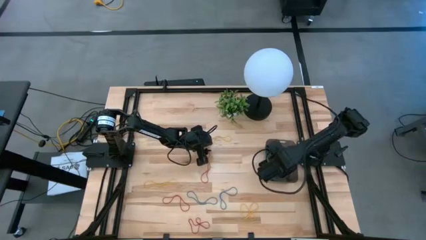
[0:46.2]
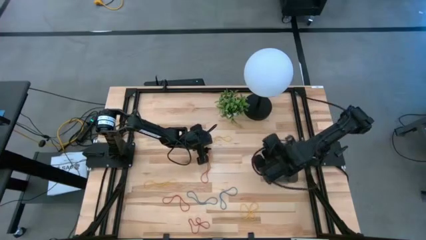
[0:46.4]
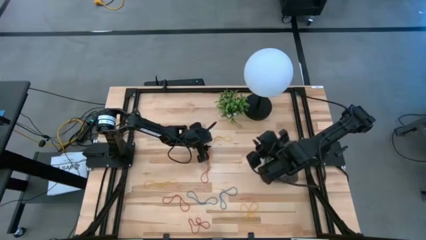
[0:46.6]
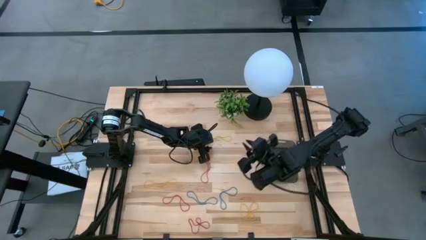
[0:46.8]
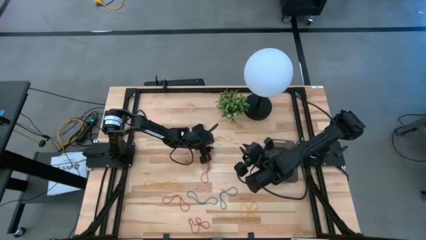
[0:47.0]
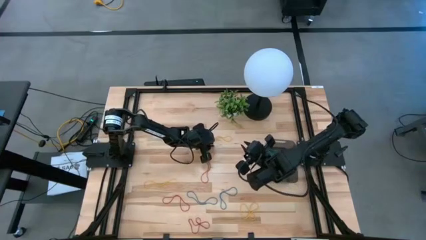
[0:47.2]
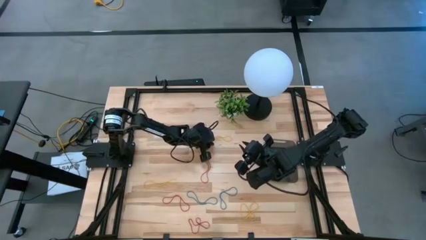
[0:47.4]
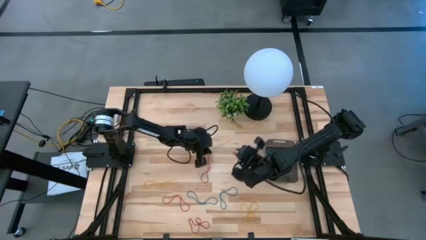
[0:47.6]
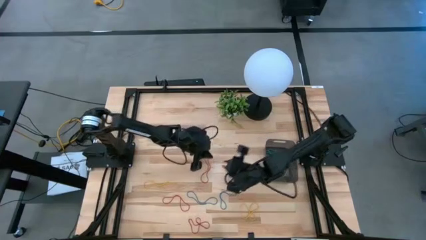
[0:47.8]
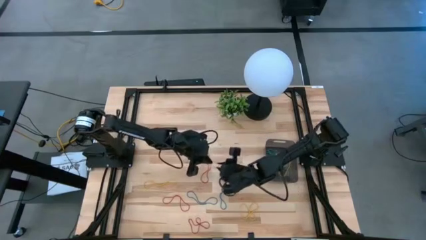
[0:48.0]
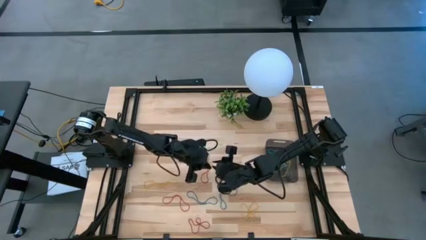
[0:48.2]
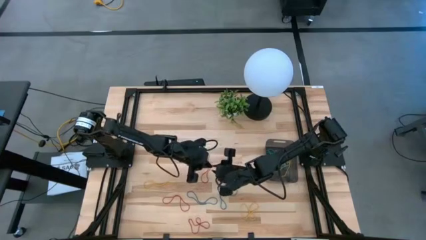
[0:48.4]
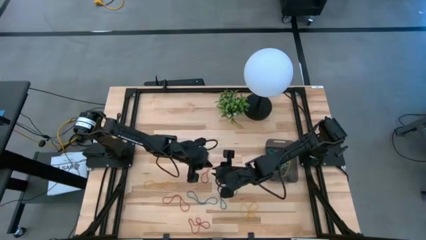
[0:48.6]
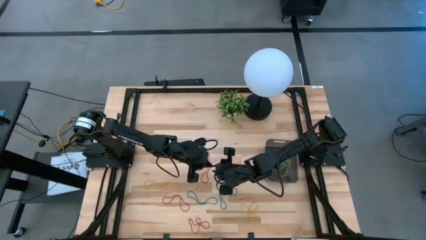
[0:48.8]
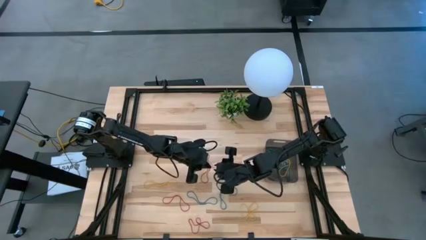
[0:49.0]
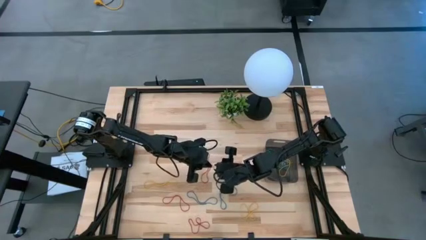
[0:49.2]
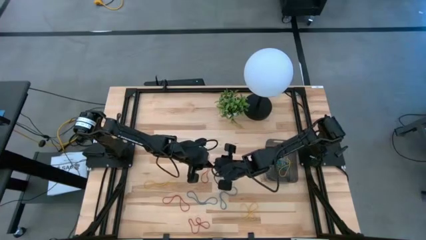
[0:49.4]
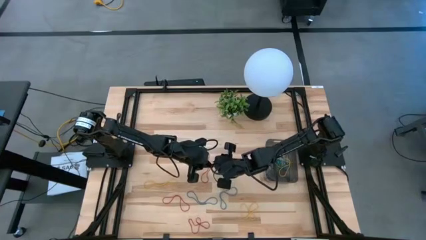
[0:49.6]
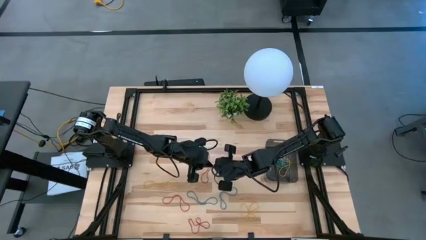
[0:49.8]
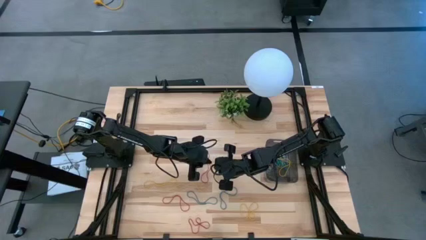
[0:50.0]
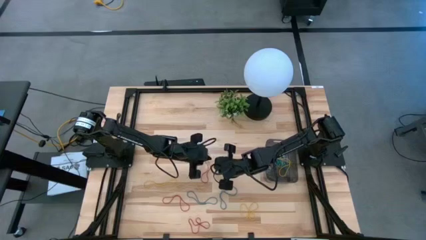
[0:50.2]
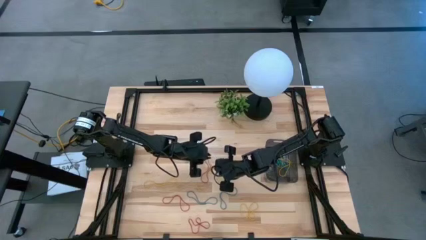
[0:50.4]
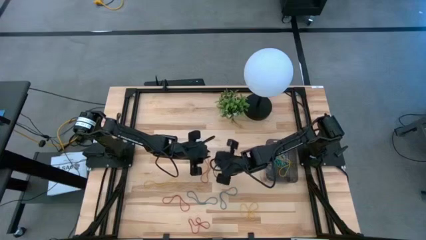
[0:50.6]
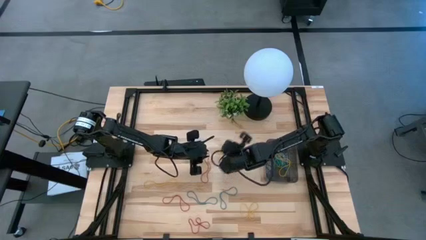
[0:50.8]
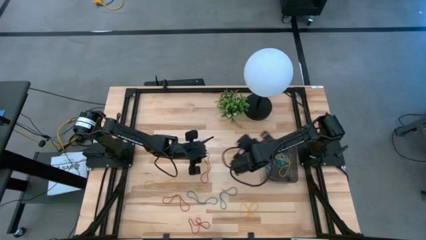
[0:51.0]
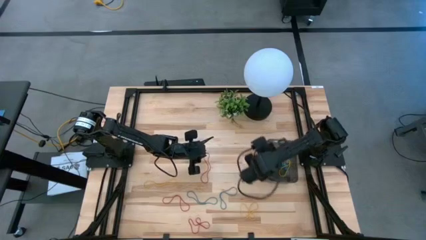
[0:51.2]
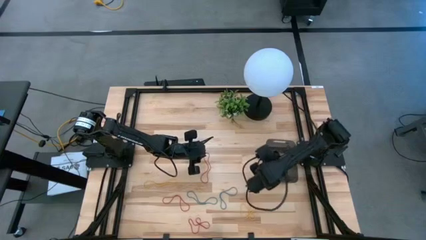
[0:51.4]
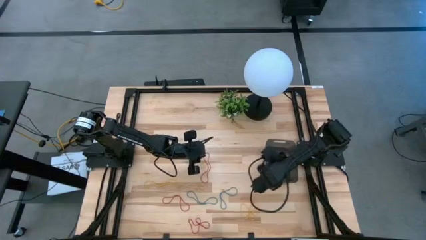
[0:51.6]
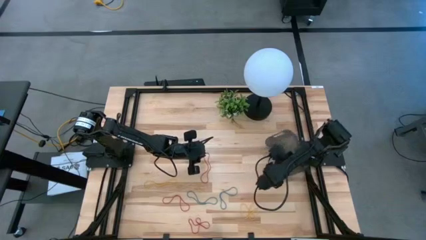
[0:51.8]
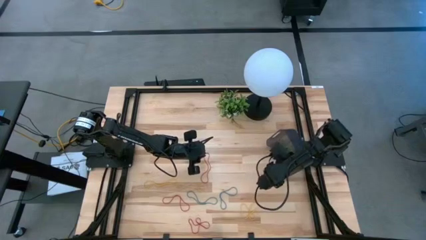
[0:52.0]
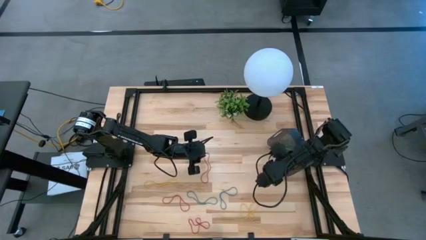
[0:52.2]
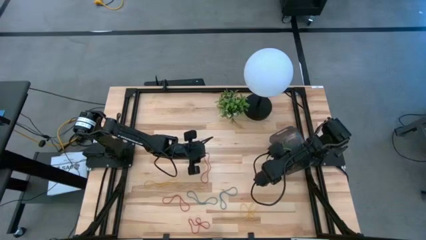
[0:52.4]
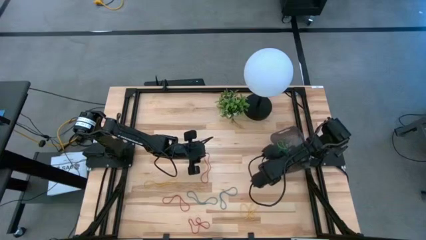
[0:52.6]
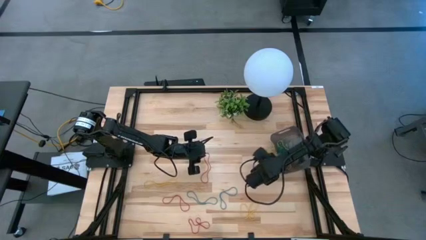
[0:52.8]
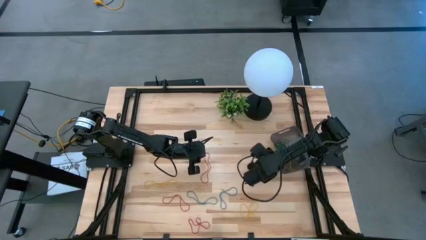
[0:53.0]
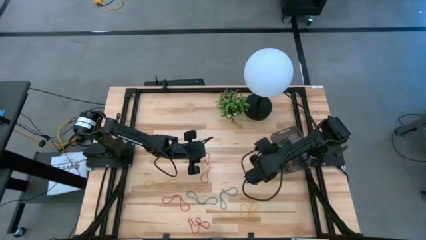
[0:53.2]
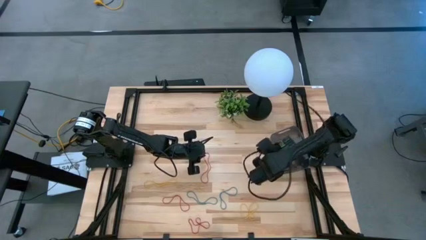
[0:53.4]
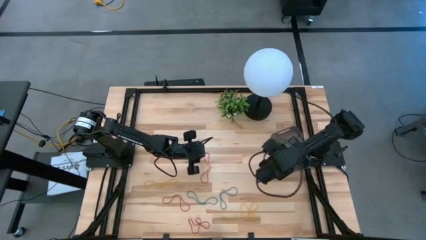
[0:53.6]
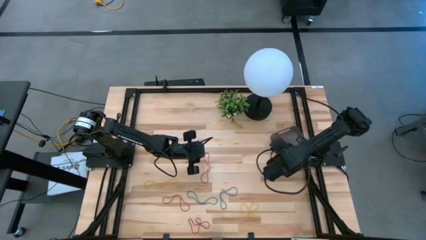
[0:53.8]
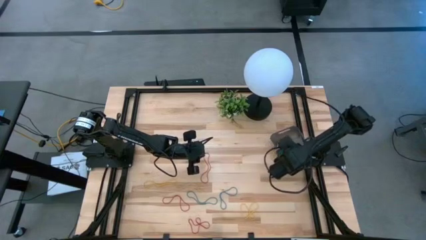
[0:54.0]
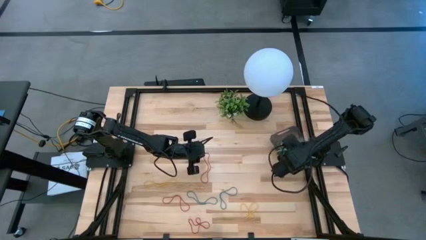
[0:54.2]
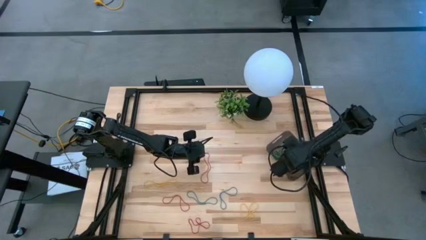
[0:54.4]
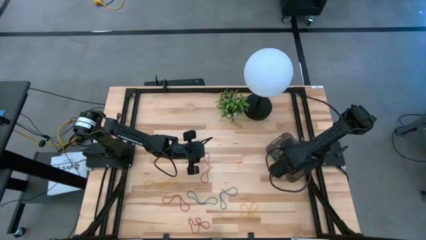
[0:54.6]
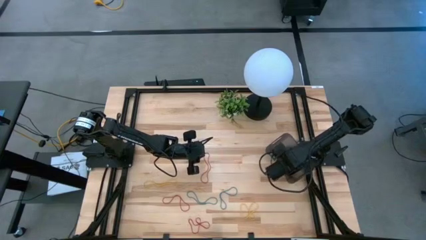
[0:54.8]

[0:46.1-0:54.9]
Task: Pick and place items into bin
Put the top yellow rubber band into the black transparent bin

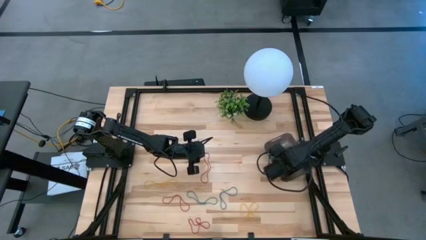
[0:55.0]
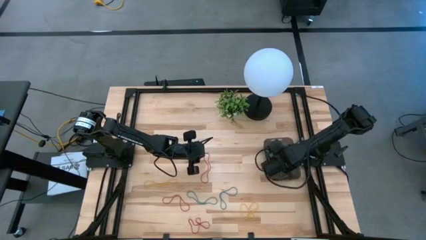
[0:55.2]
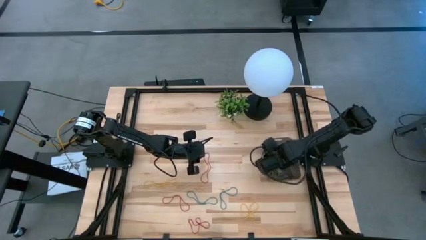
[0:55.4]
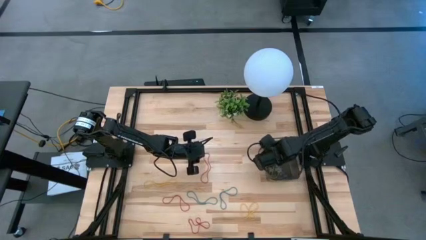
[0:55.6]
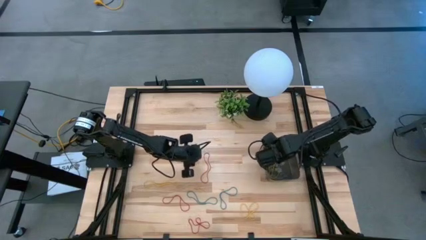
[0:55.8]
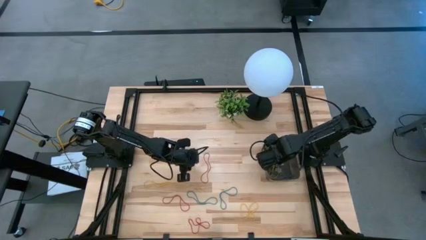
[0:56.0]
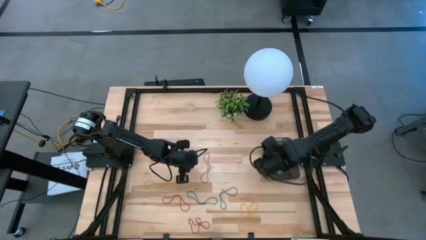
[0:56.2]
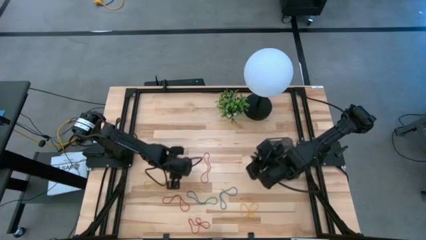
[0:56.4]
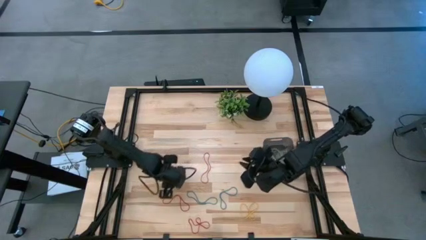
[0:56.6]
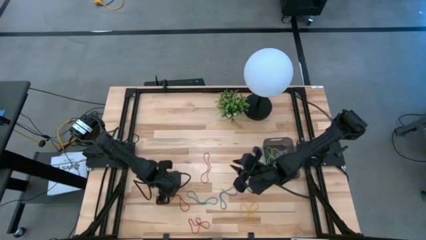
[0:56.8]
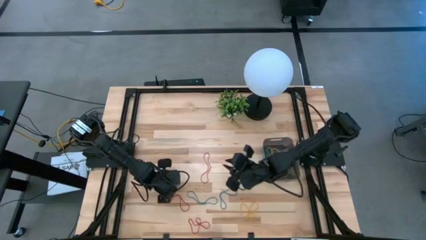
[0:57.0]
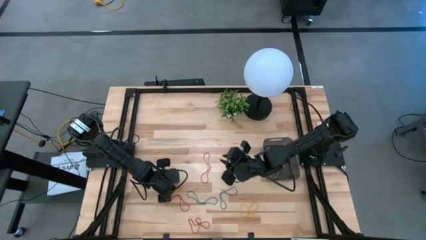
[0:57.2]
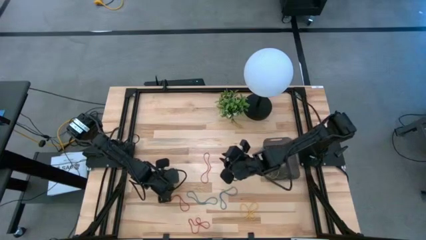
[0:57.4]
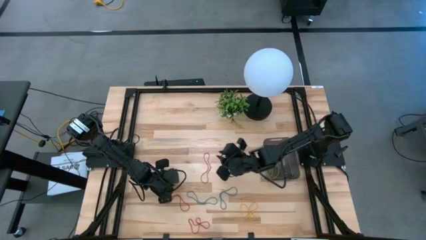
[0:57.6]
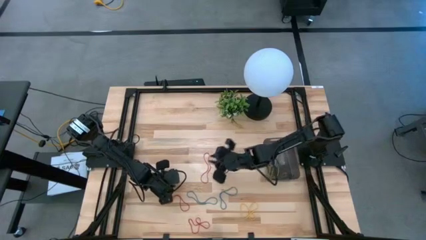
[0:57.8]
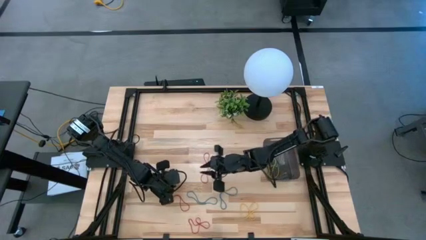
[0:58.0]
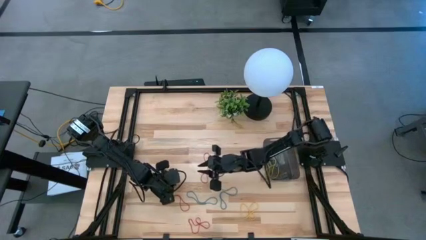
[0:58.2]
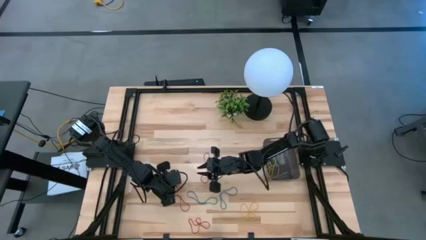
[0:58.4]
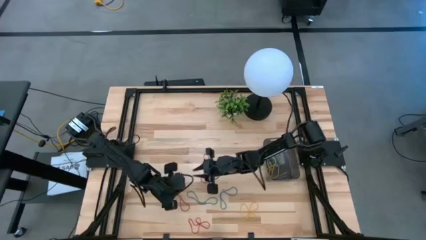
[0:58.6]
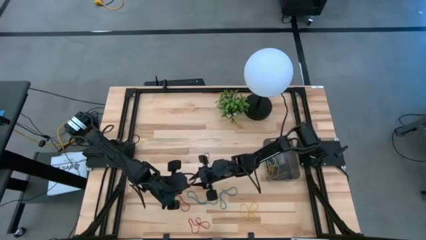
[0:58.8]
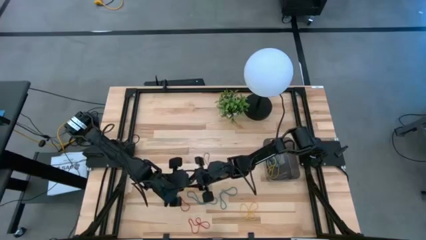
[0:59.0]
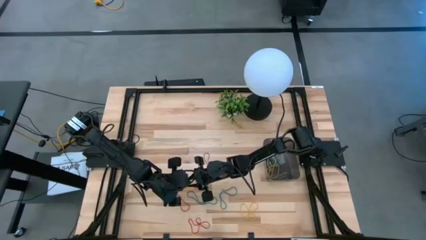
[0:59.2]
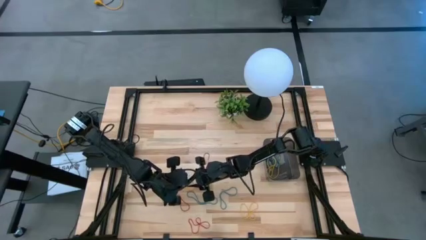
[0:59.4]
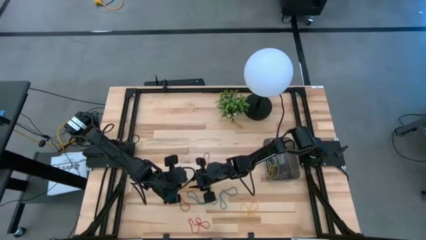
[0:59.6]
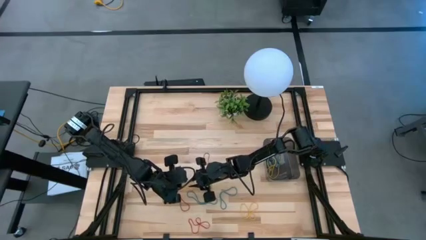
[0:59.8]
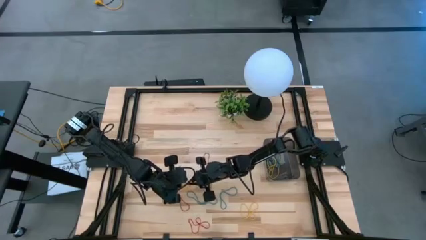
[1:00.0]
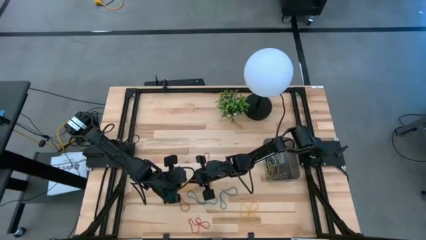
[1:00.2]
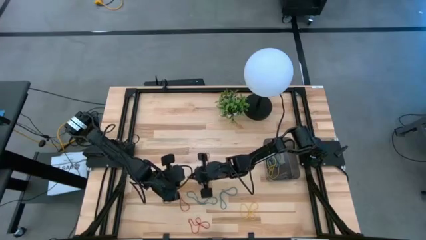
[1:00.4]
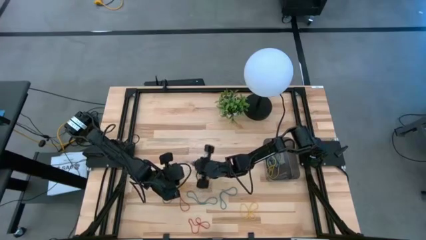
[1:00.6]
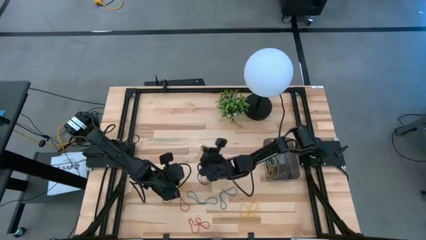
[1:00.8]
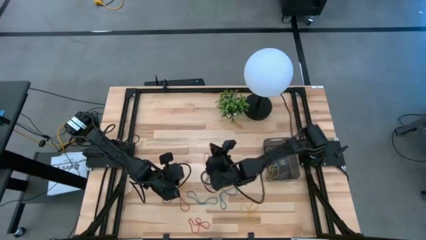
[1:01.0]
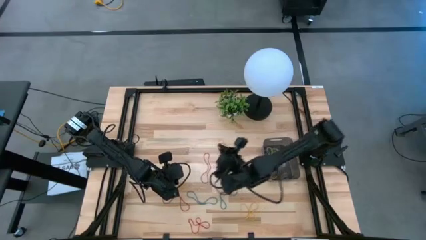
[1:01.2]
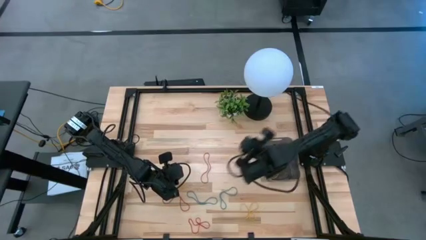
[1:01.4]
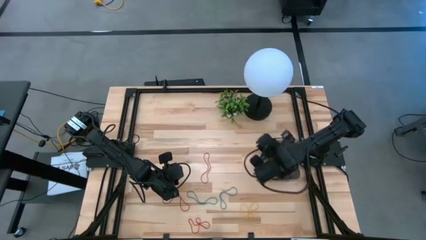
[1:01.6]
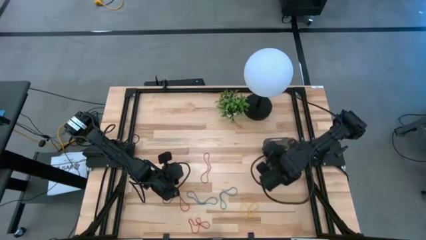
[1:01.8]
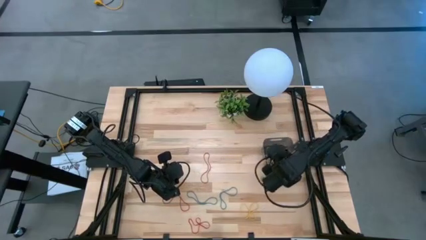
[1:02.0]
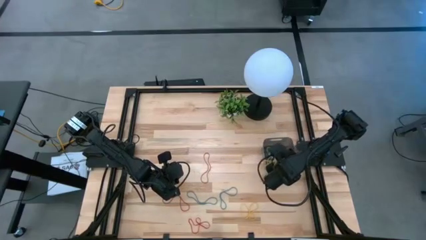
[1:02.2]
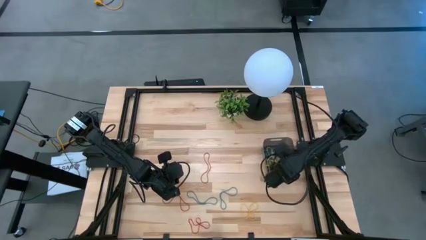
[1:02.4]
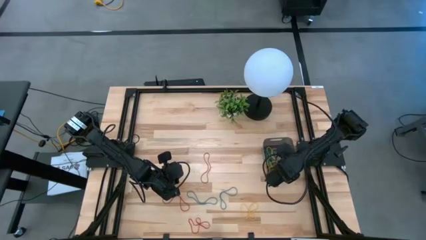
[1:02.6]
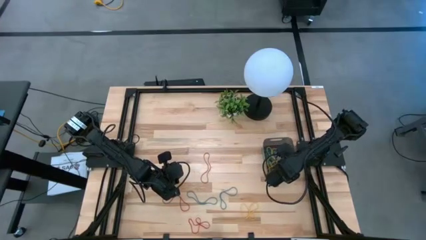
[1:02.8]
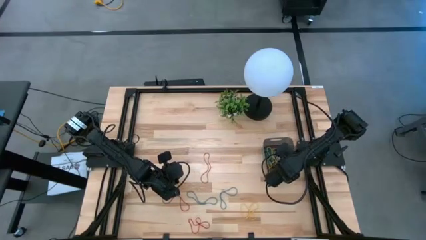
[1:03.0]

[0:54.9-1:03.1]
Put the left yellow rubber band into the black transparent bin
